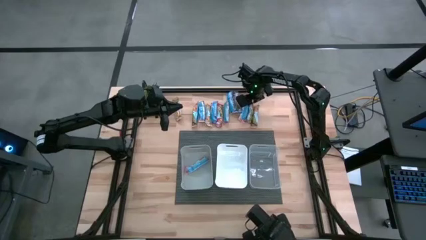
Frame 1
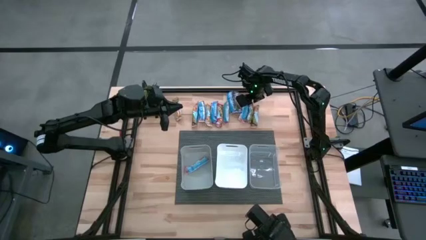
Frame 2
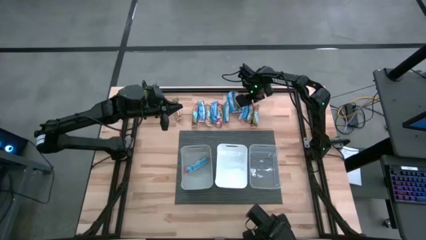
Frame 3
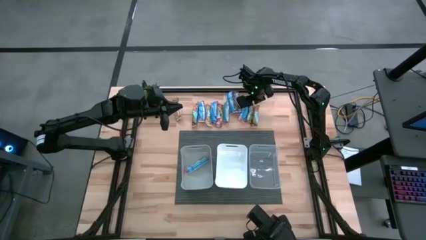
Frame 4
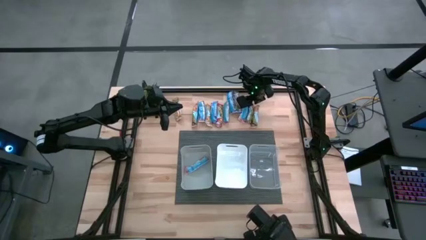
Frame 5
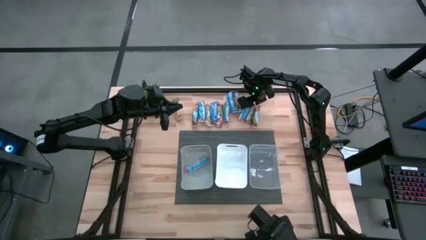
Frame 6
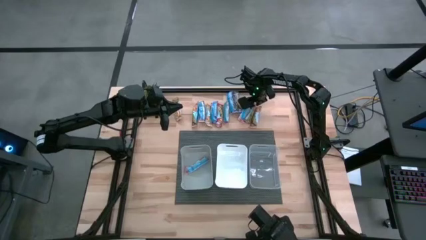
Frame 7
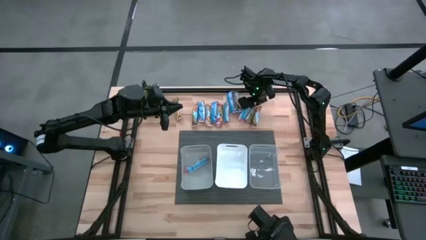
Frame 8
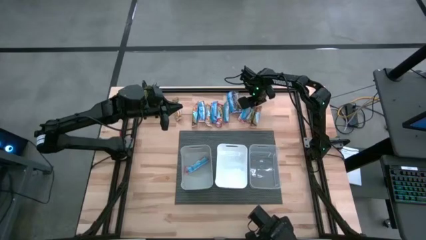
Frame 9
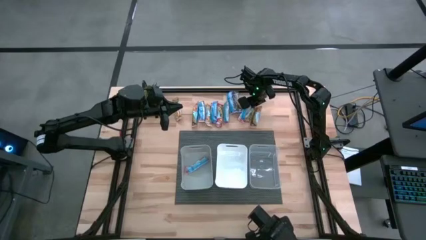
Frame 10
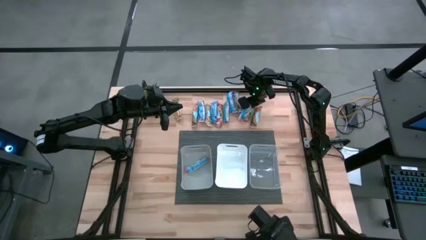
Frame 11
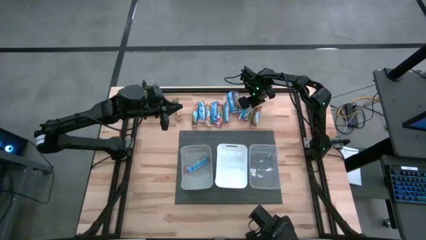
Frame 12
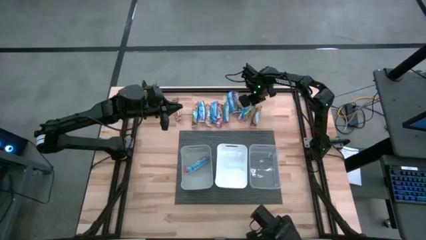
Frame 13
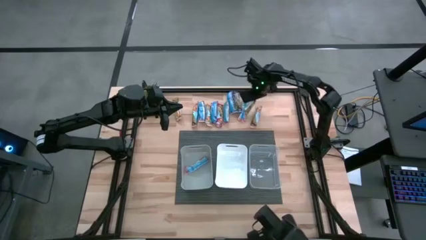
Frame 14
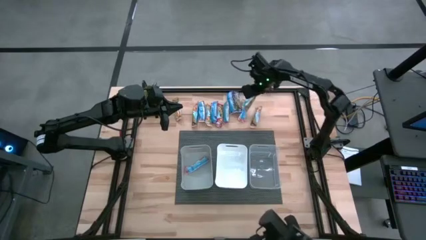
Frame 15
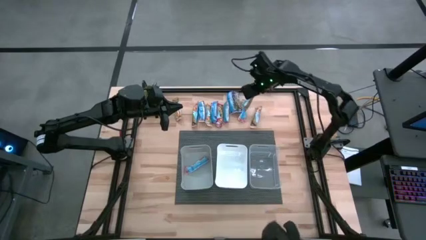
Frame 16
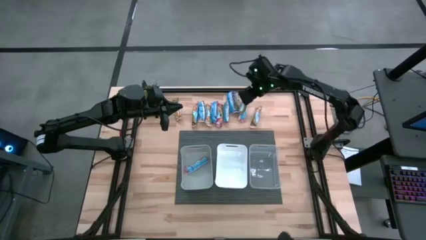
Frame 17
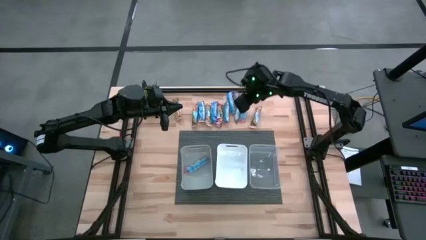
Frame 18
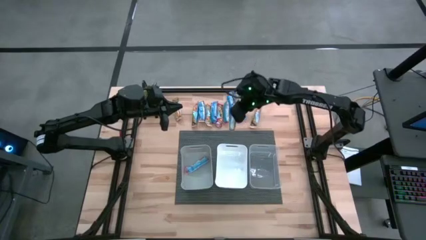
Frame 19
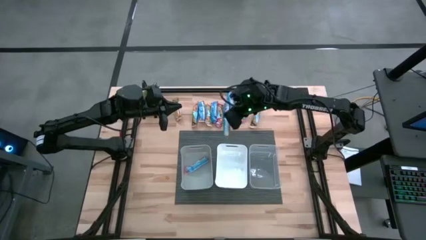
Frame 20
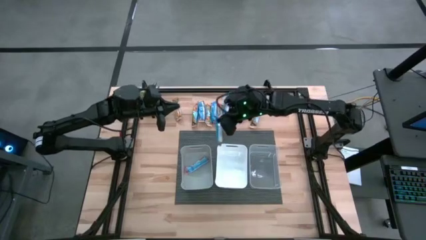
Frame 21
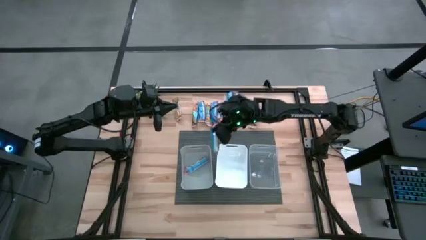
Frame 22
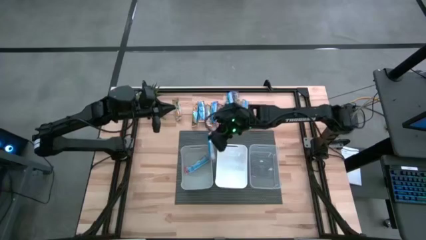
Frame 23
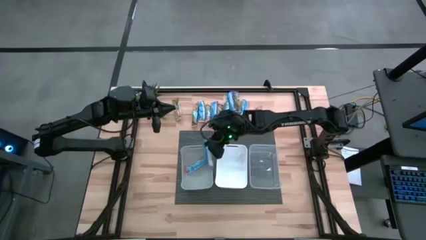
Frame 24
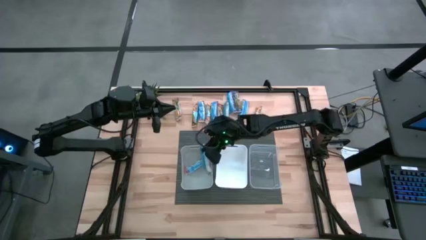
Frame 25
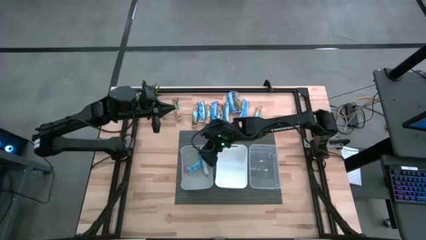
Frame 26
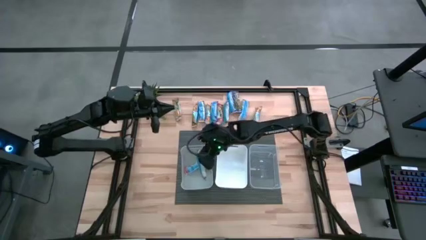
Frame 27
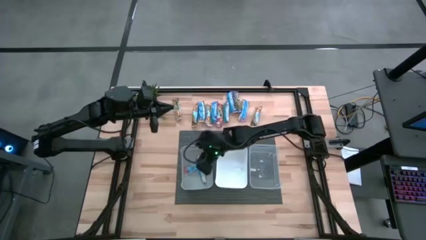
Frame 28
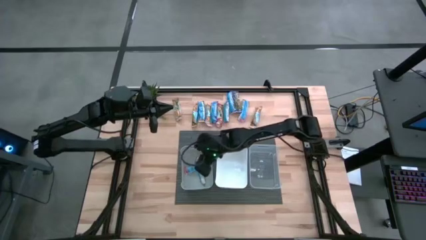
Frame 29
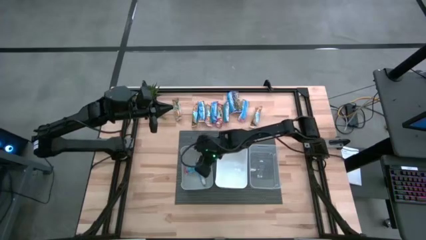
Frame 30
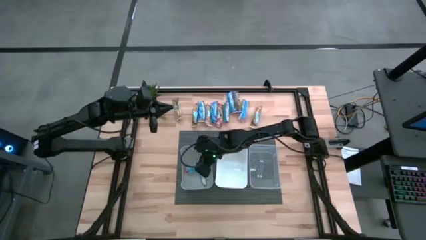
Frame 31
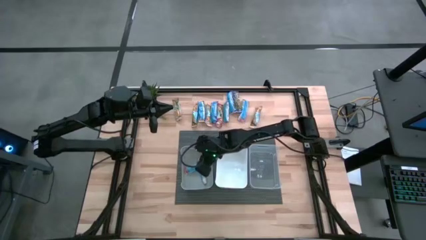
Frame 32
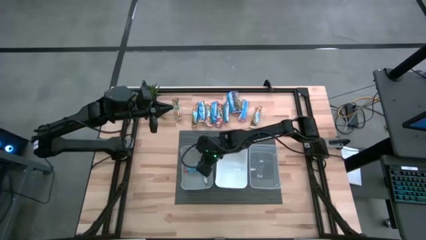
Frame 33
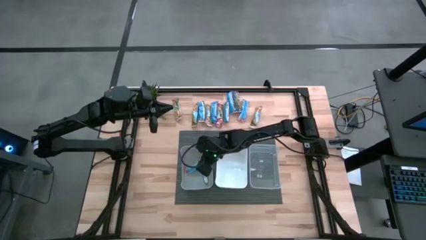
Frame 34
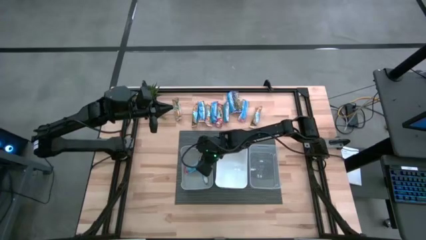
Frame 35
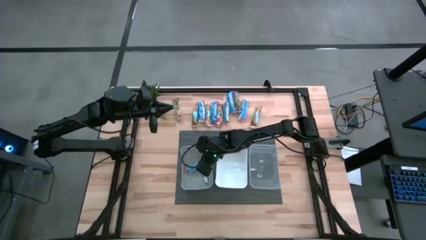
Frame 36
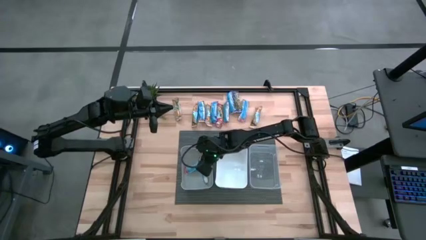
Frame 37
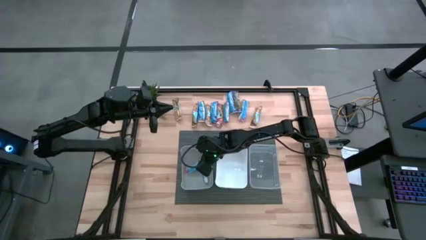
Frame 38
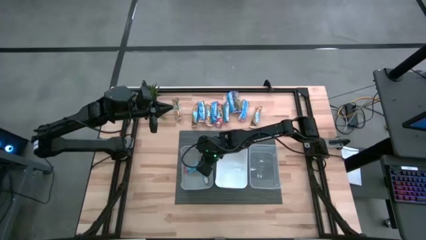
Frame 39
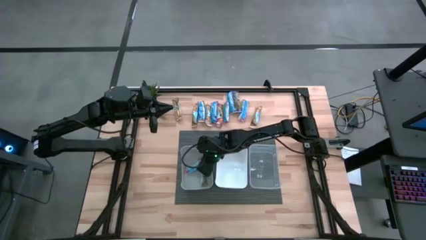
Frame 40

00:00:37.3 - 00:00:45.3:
Task: Pick and place Granola Bars by type
Put the red granola bar into the gray bin

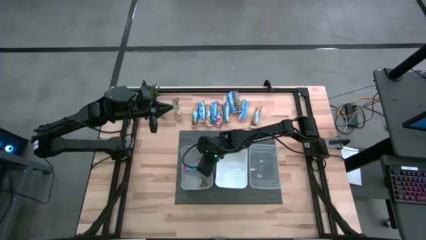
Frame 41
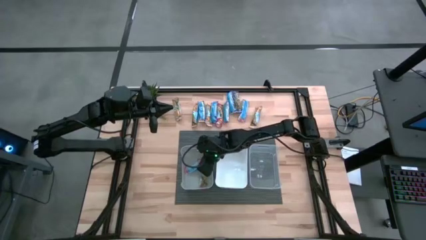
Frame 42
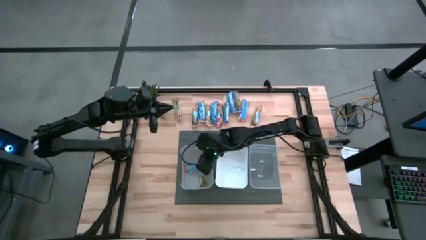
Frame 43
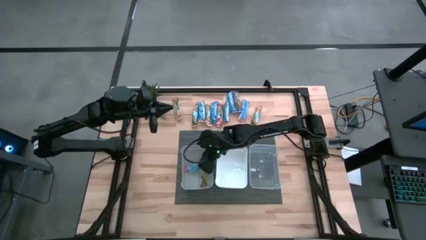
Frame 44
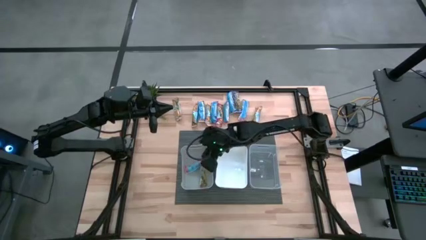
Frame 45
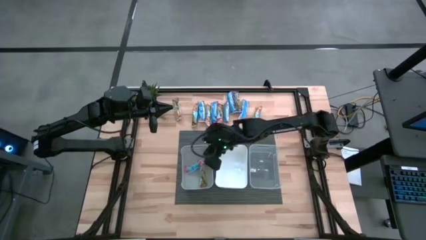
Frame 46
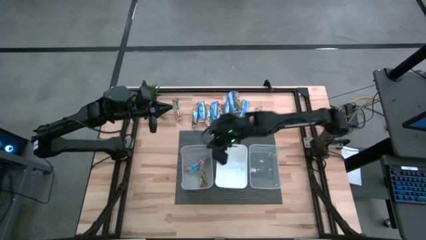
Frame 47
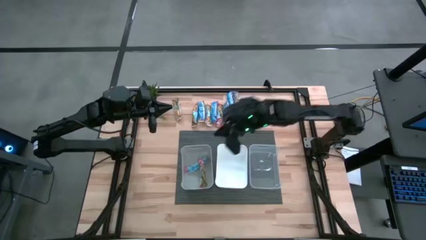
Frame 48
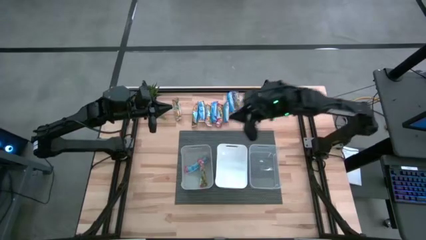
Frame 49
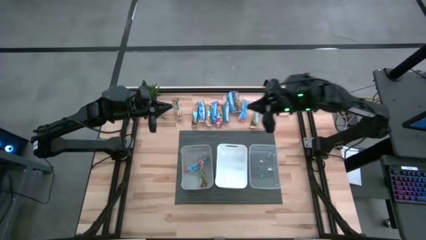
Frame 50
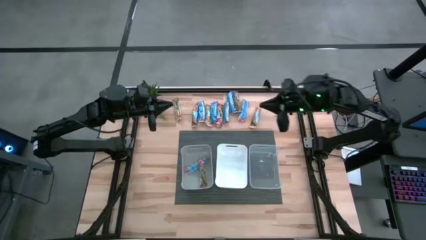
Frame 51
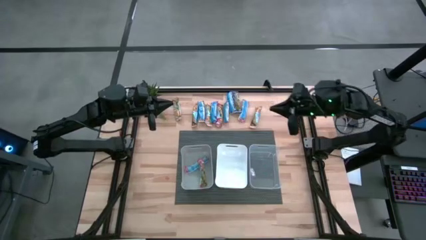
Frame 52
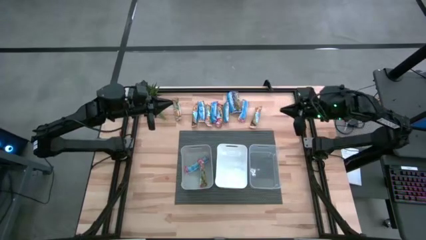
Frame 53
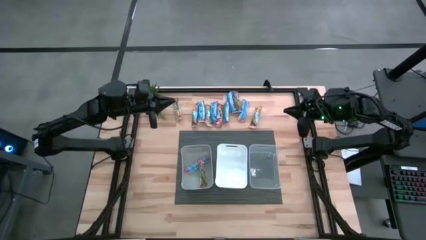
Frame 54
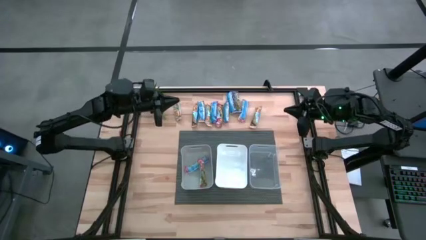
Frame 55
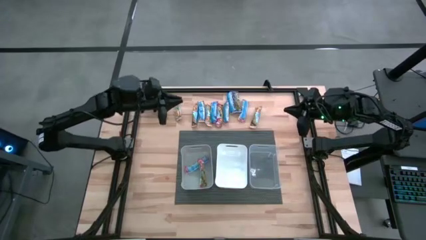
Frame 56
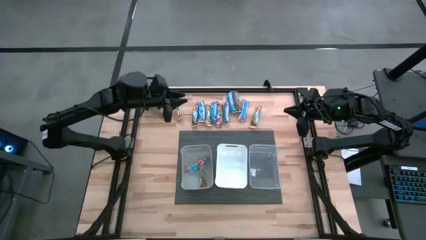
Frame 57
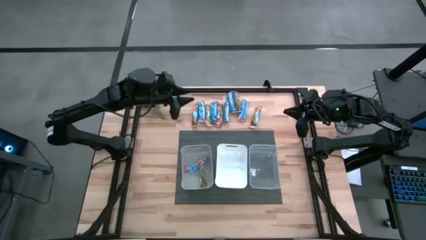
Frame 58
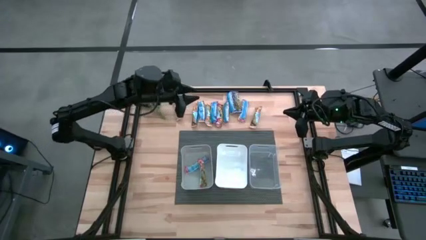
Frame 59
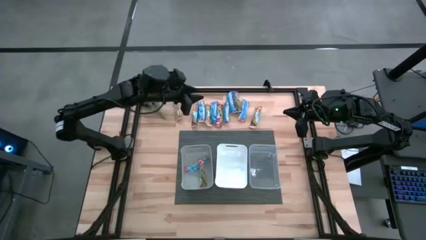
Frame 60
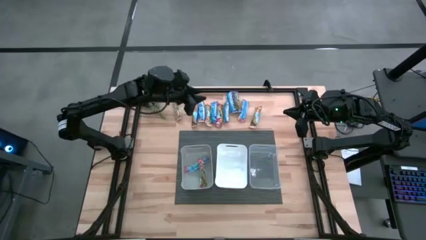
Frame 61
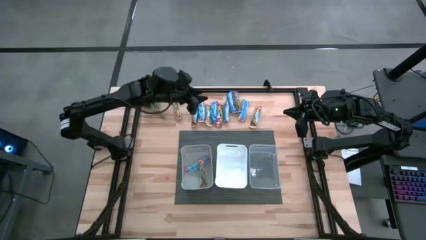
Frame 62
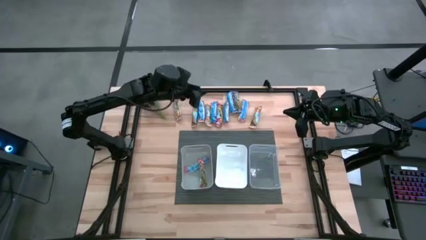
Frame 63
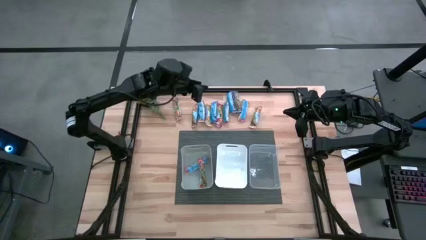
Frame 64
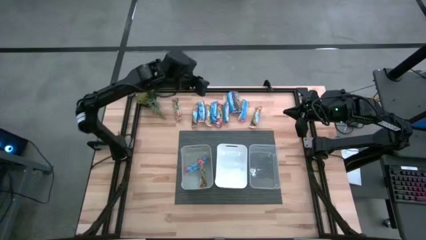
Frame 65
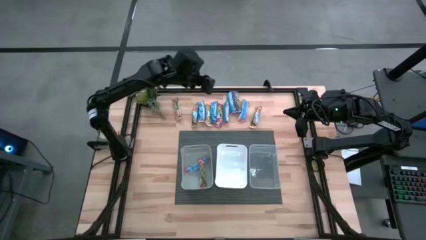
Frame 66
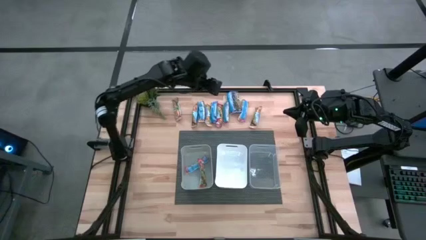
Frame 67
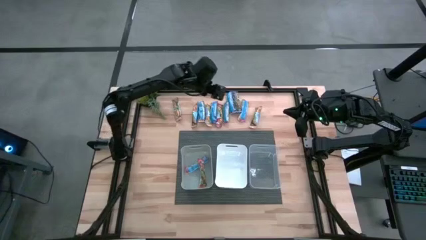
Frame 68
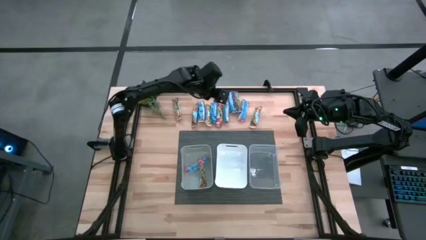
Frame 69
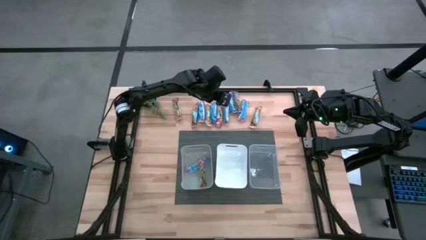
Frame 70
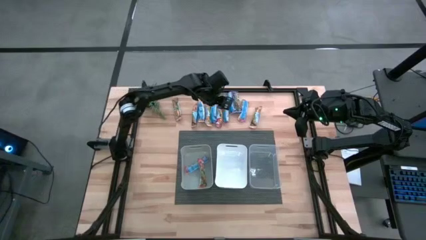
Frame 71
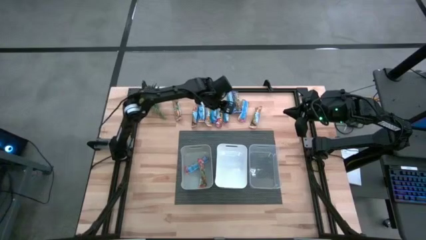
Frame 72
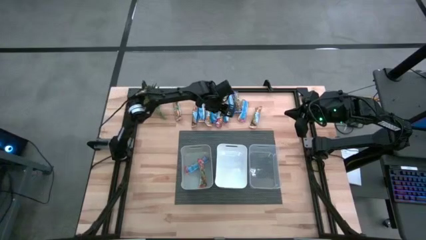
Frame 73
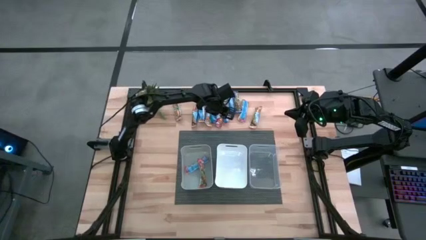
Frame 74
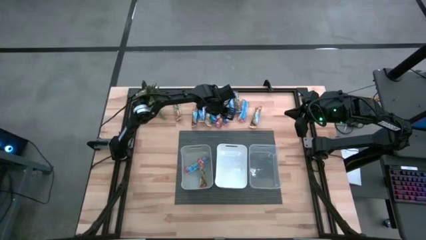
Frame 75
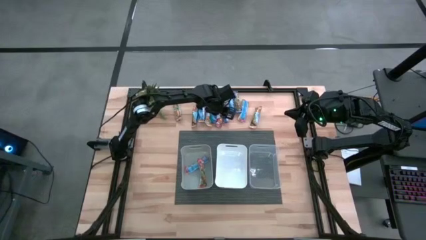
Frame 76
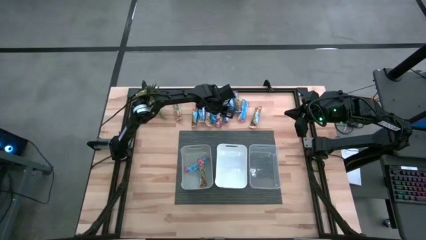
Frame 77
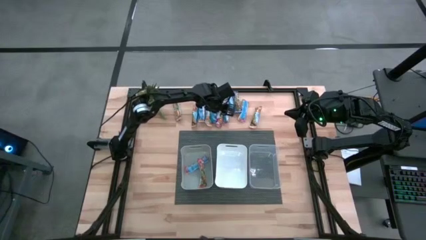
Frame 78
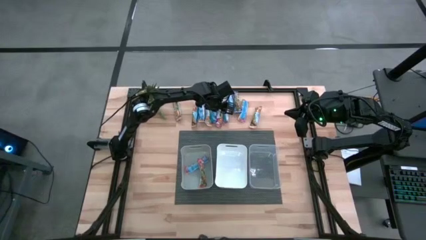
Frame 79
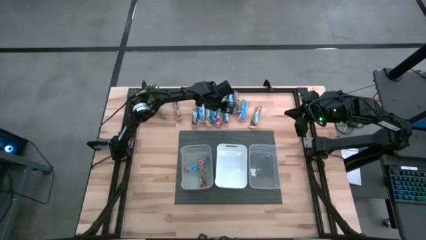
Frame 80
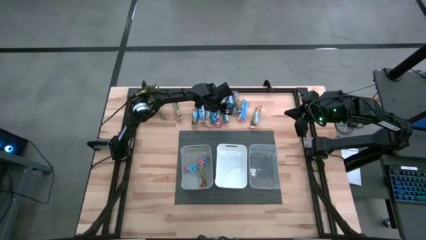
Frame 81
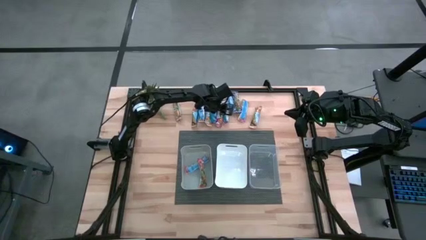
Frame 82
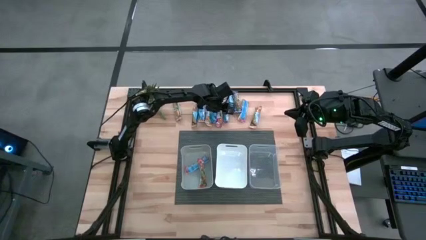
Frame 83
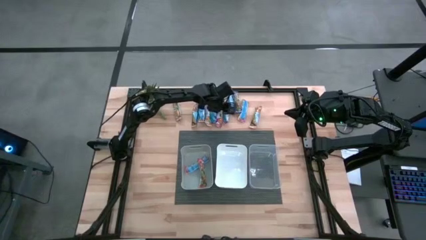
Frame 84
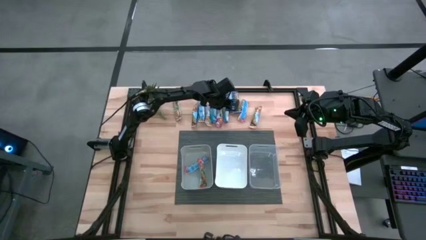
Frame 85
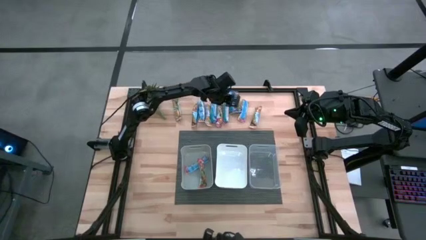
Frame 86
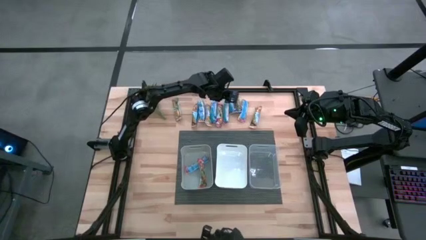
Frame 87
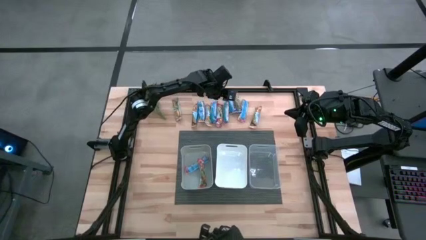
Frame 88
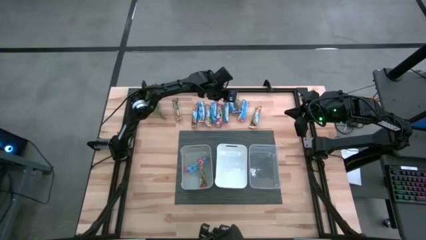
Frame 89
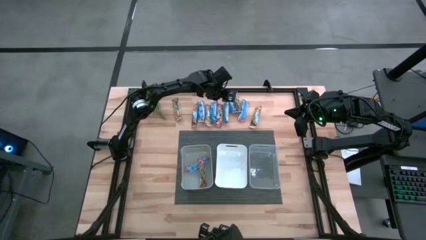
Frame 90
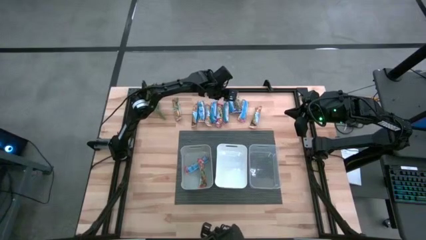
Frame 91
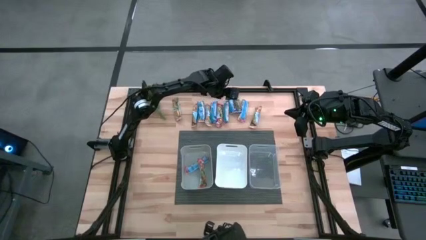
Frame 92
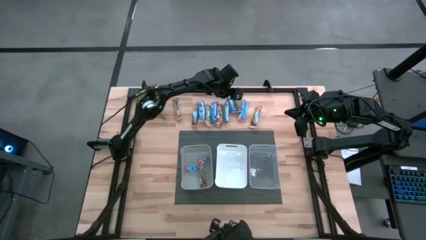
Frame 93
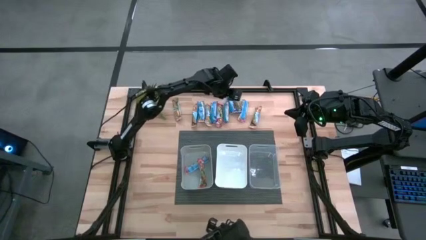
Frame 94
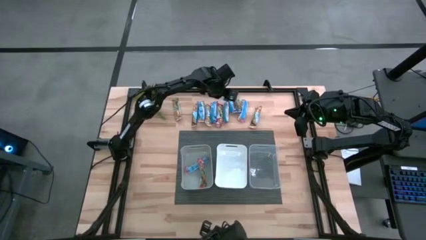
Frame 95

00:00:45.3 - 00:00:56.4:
Put the red granola bar into the gray bin
